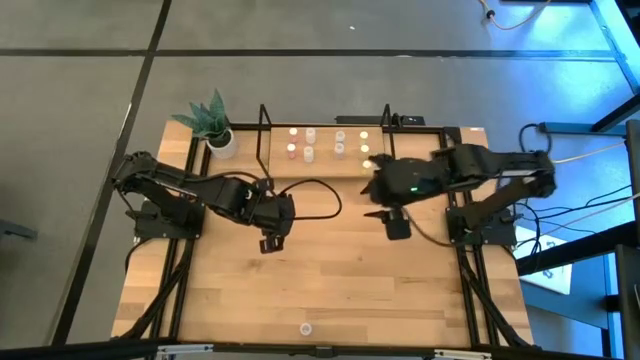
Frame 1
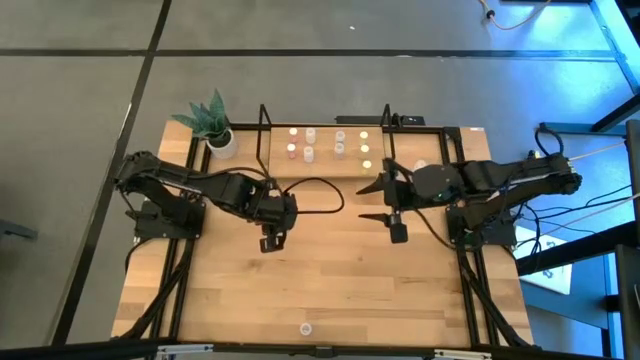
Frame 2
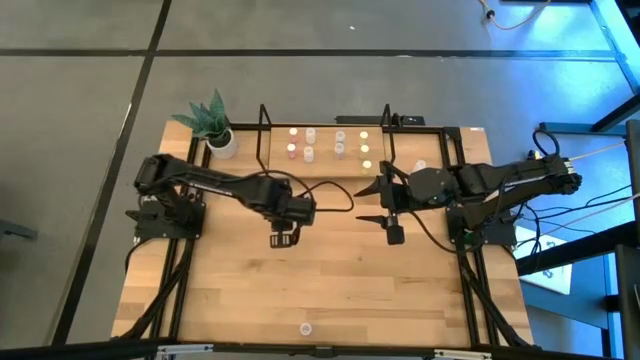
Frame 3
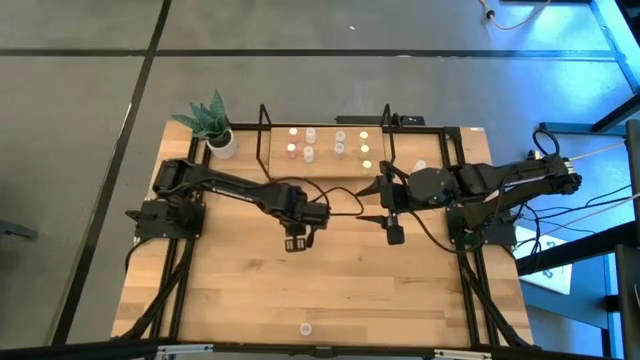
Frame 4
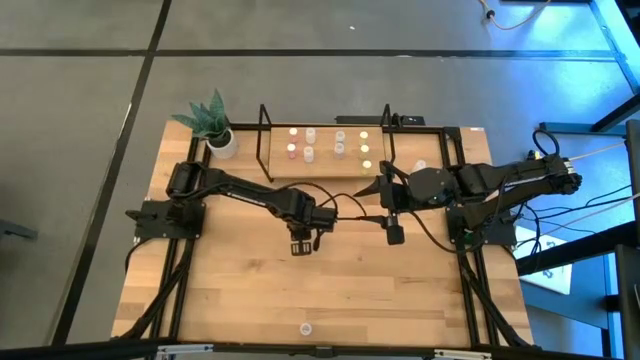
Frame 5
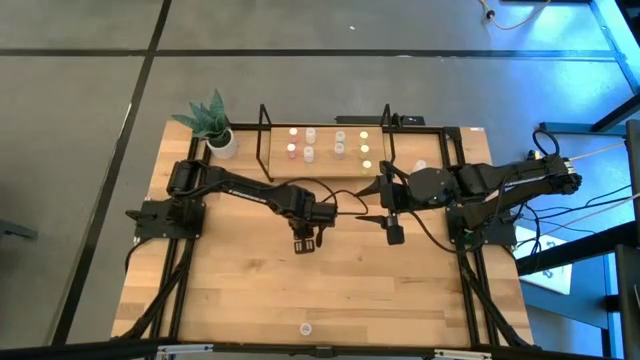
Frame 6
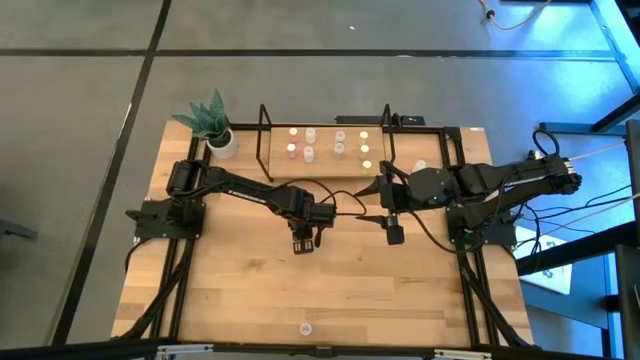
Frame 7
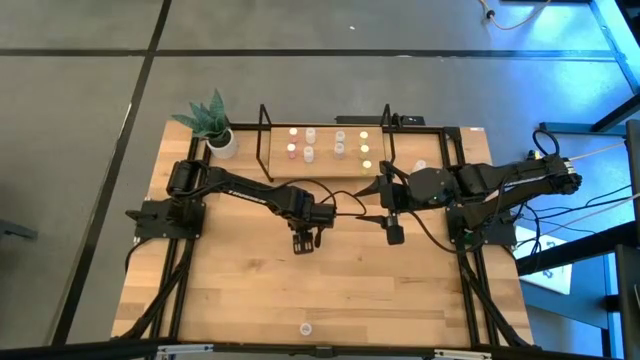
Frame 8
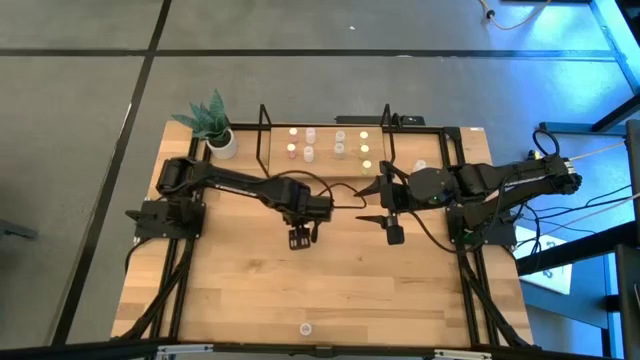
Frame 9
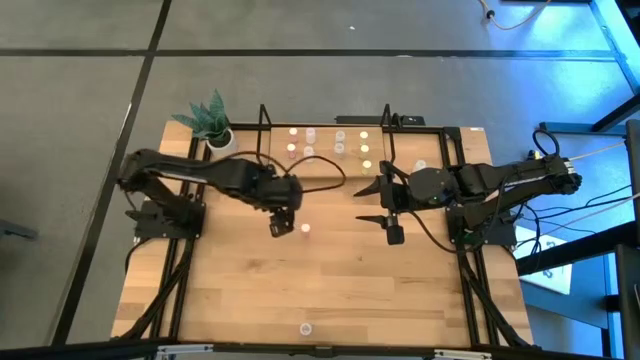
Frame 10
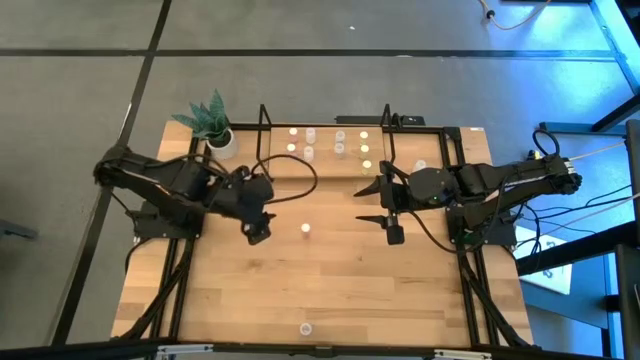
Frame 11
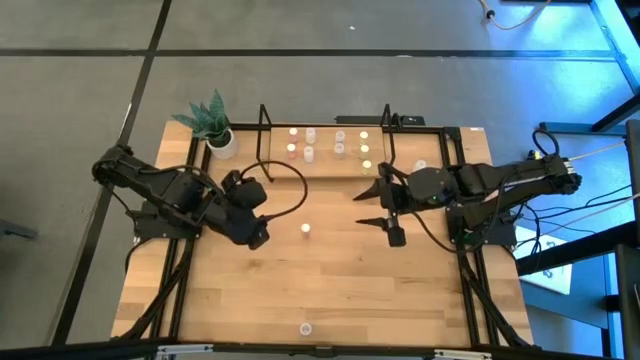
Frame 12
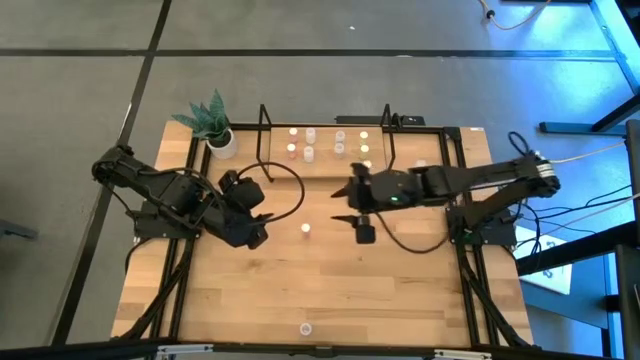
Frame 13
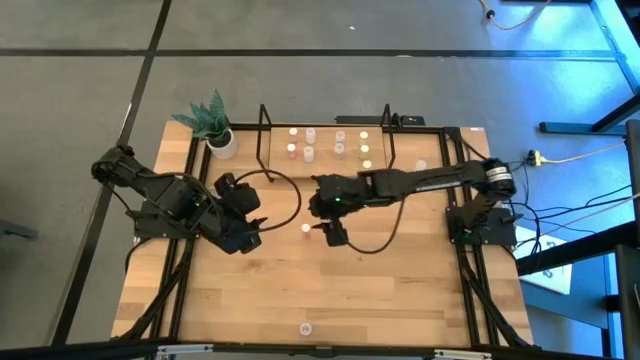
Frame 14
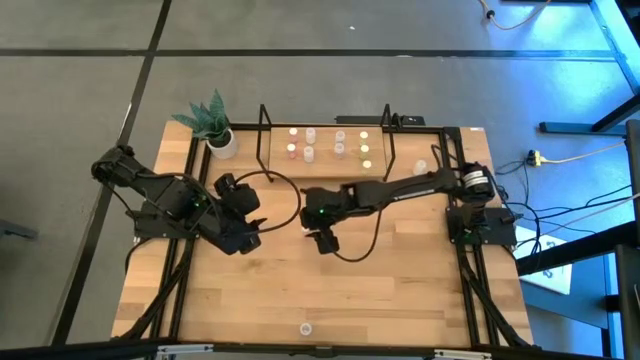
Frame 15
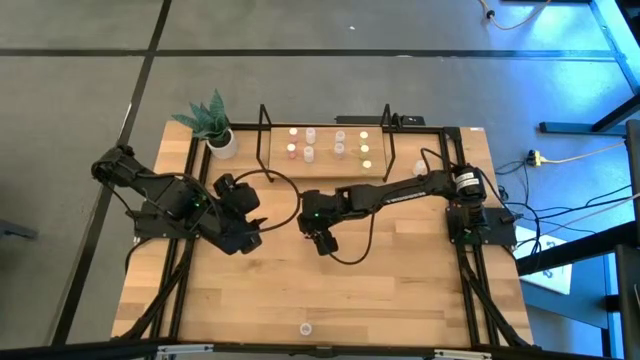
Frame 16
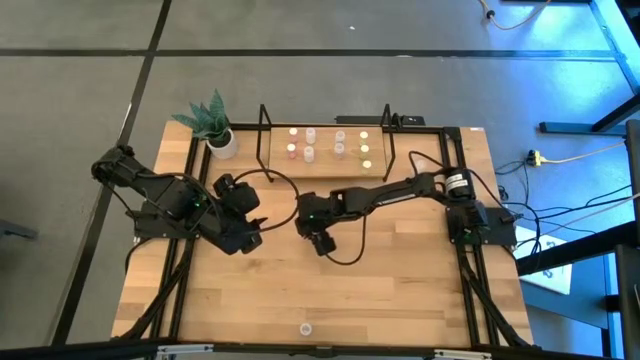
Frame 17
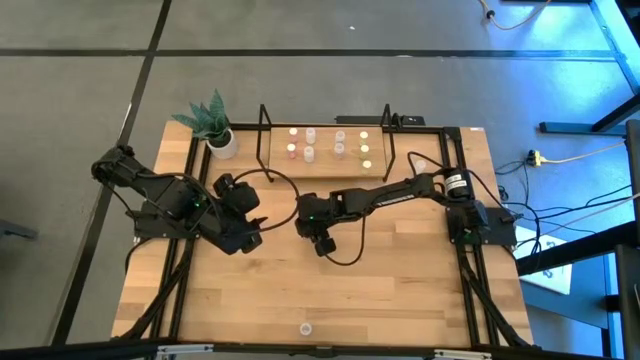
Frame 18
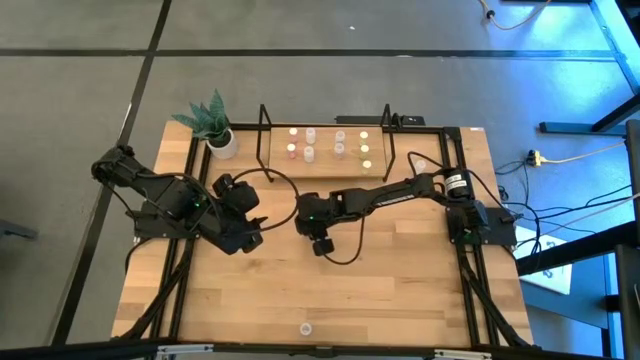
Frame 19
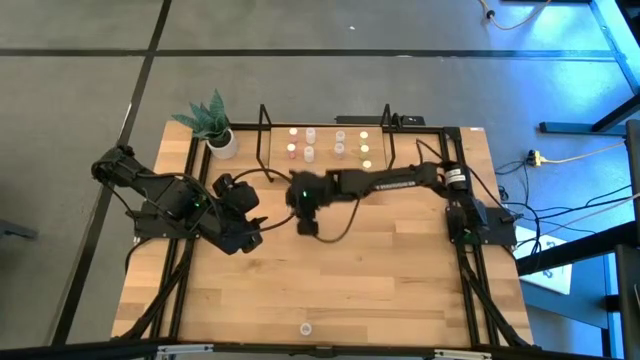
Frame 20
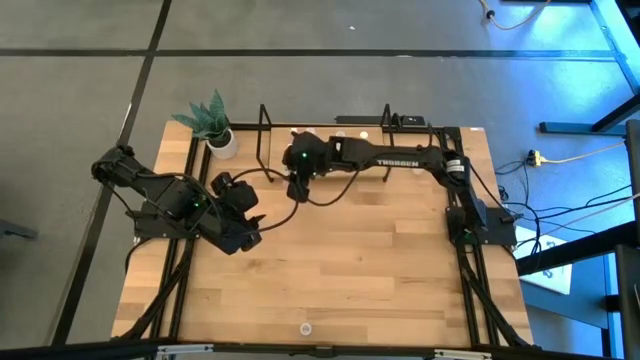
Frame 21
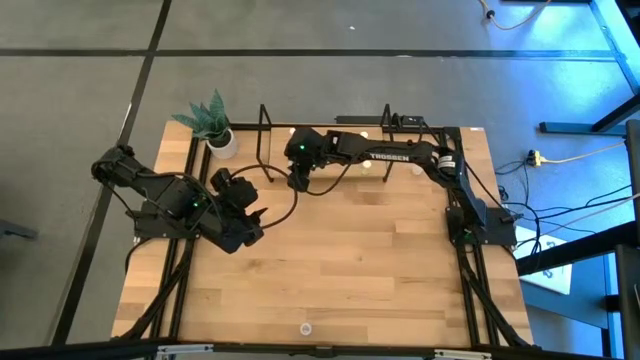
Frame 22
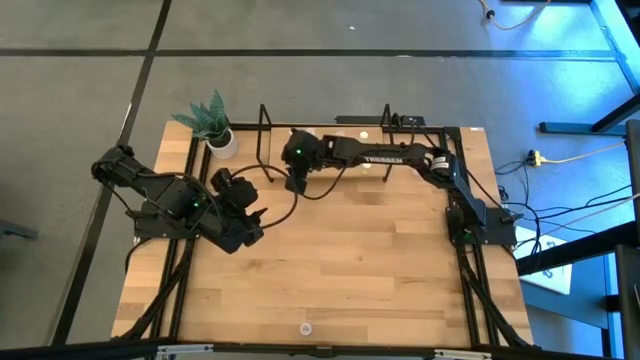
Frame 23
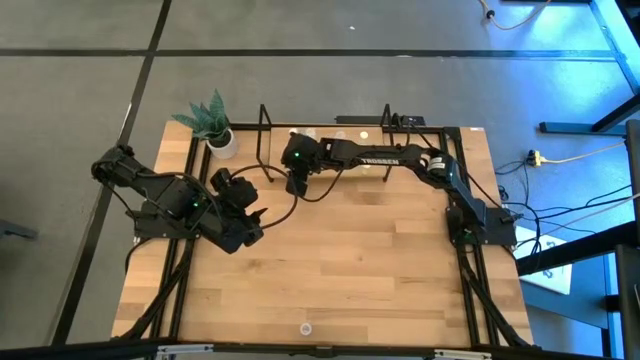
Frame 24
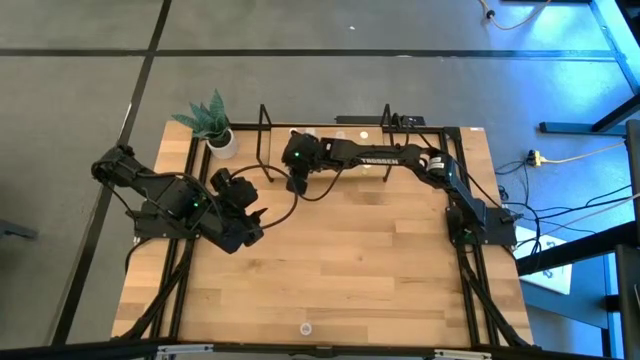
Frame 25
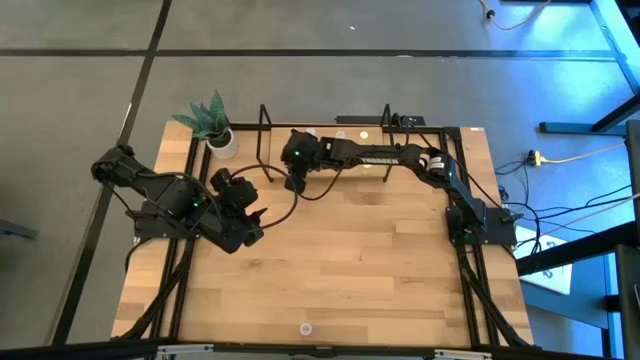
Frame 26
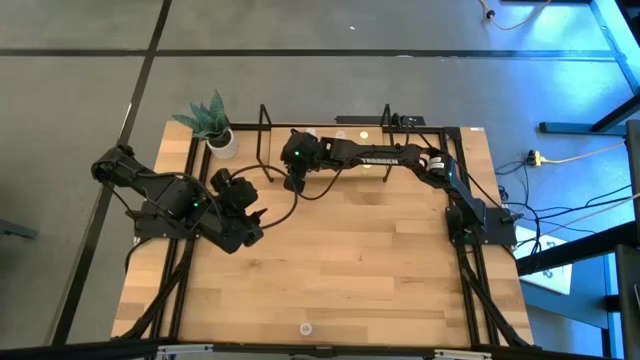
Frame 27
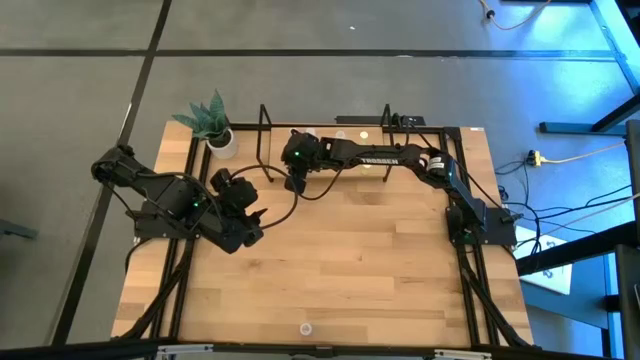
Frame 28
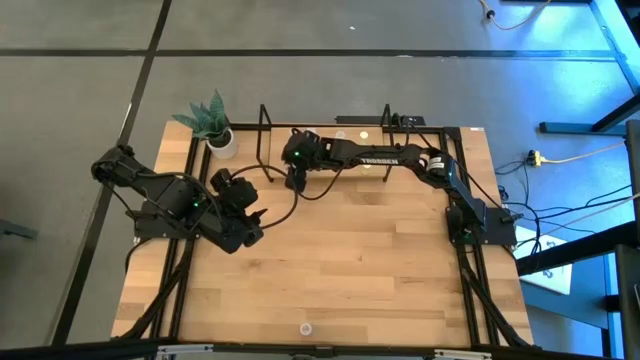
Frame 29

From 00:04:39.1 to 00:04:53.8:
Task: Pick and place medicine bottles onto shelf by color
Put the pink pill bottle on the shelf aligned with the other pink pill bottles

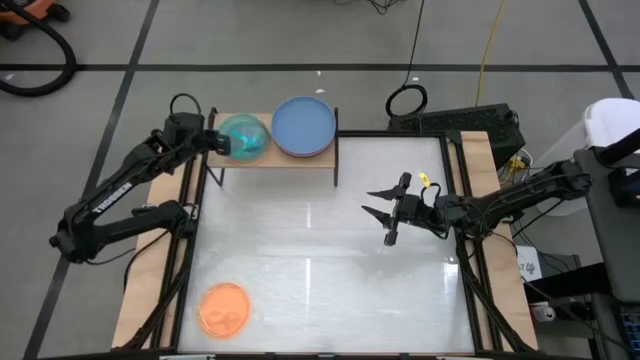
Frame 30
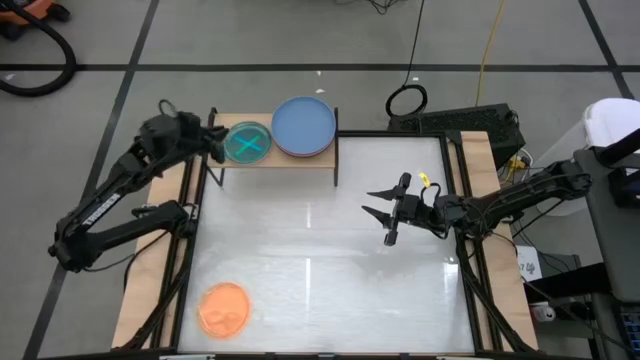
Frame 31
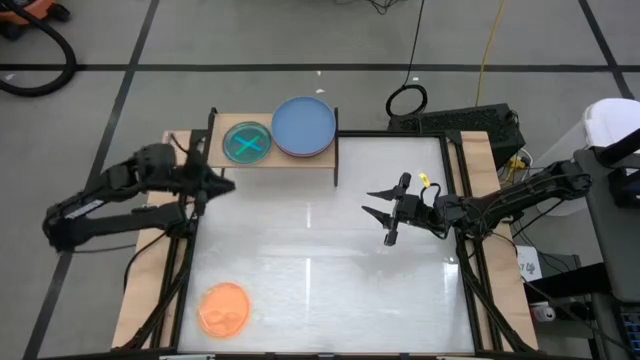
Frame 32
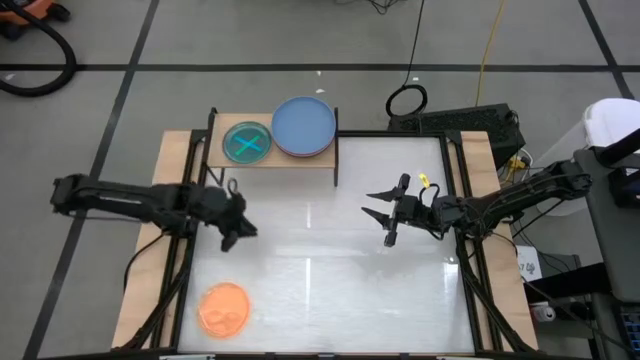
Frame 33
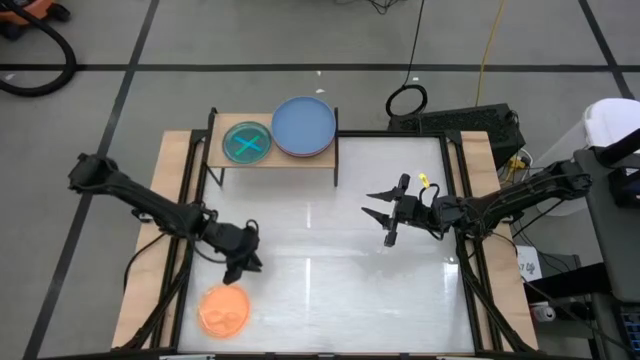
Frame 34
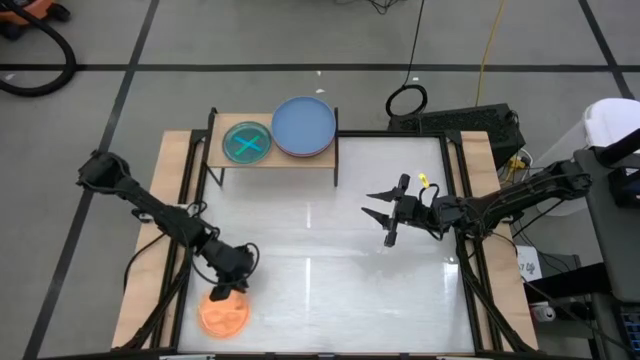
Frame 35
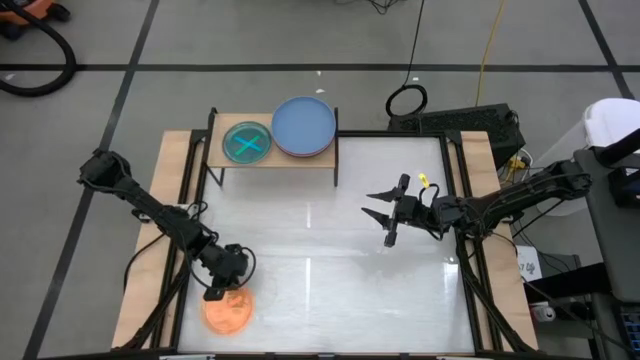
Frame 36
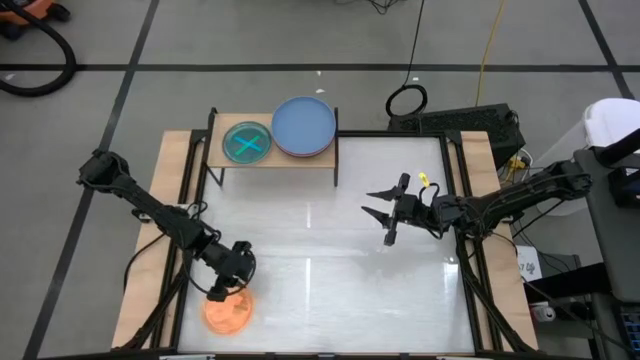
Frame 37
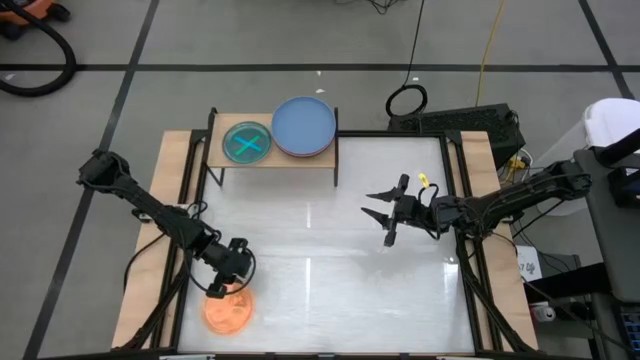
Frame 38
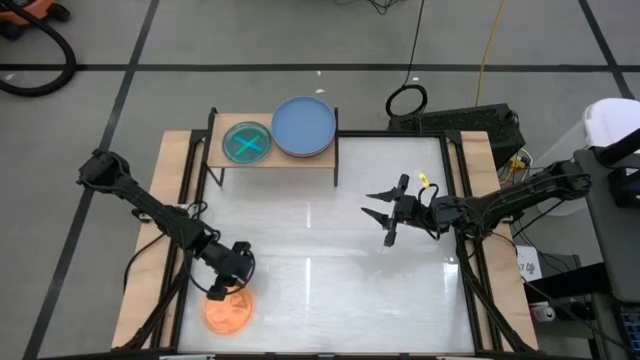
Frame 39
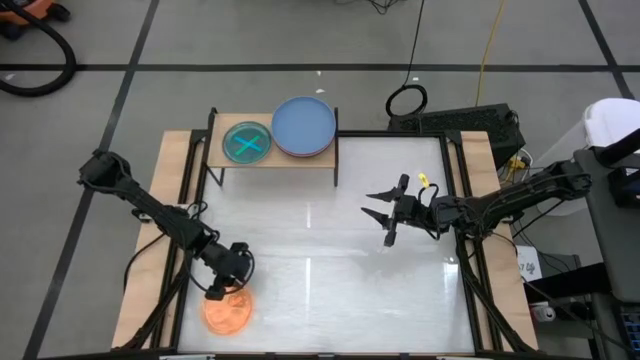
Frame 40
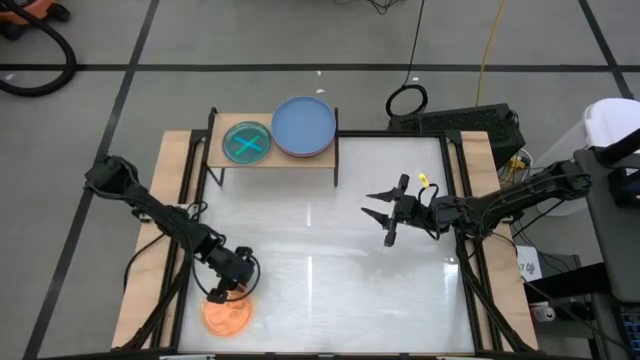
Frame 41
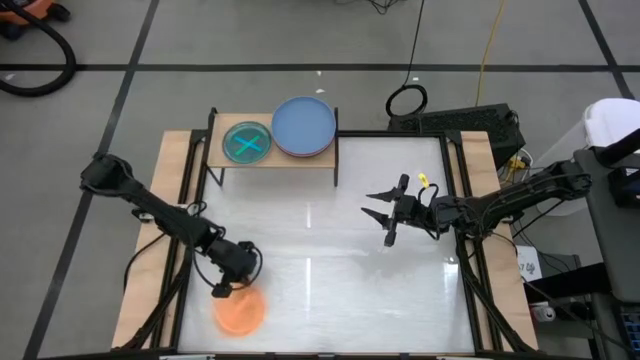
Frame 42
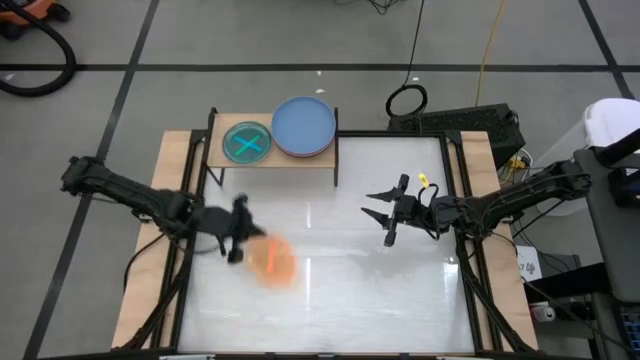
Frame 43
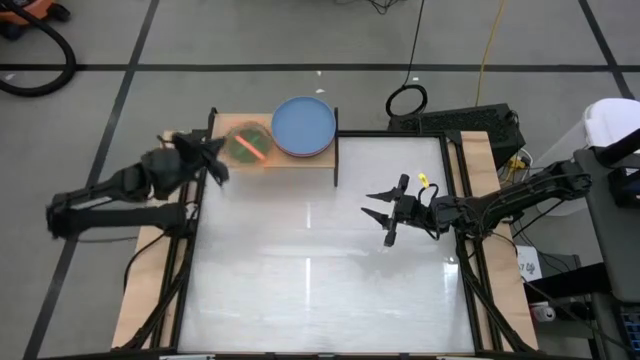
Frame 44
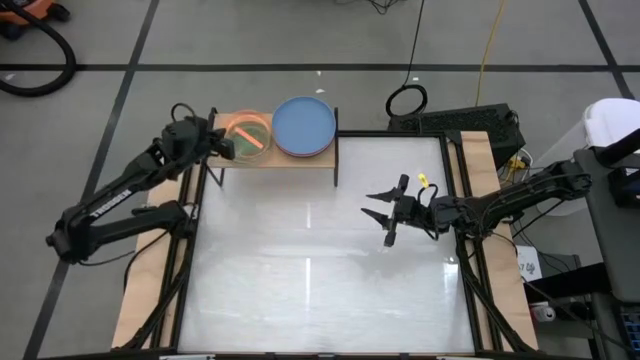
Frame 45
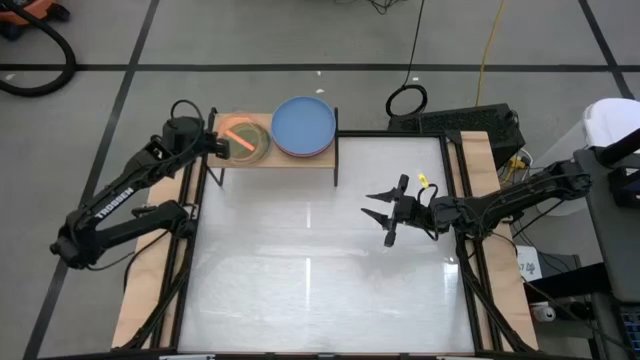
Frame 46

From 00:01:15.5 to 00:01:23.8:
Task: Place and stack plates onto a shelf
Put the transparent orange plate on top of the transparent blue plate on the shelf
